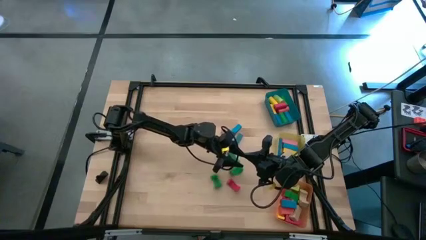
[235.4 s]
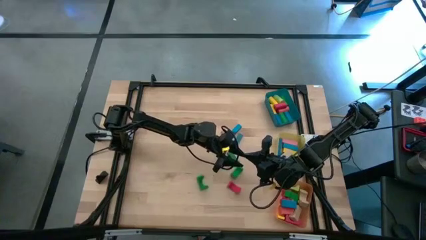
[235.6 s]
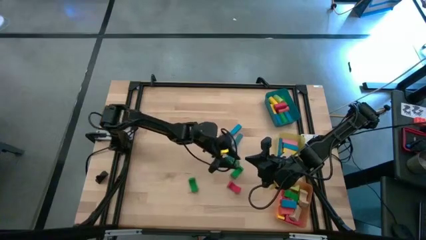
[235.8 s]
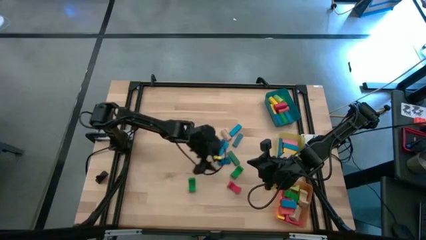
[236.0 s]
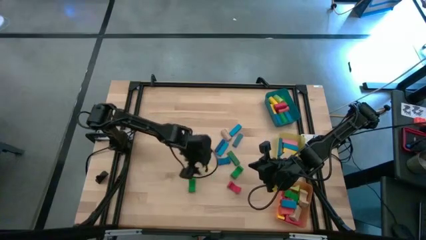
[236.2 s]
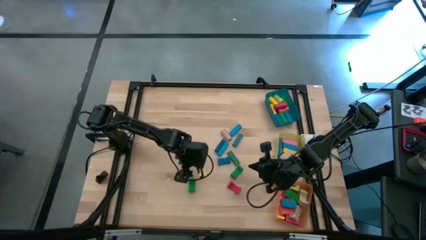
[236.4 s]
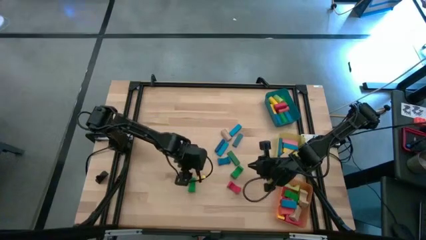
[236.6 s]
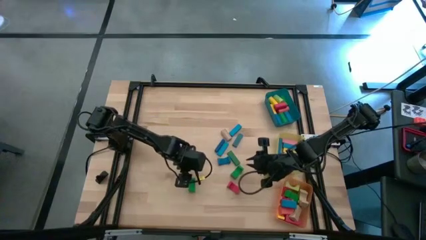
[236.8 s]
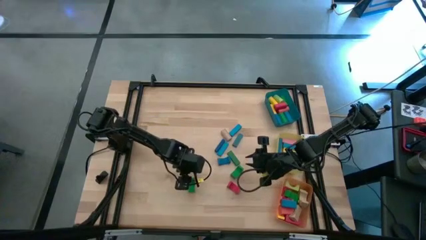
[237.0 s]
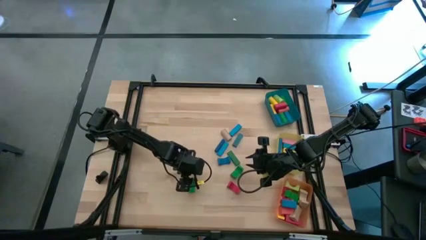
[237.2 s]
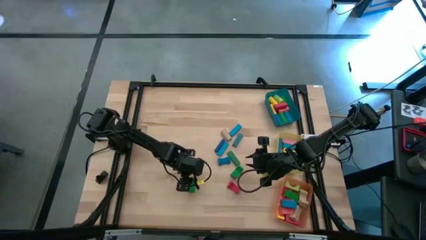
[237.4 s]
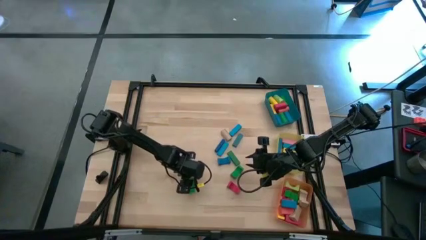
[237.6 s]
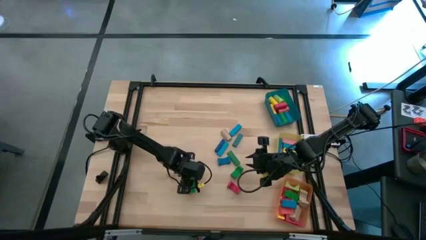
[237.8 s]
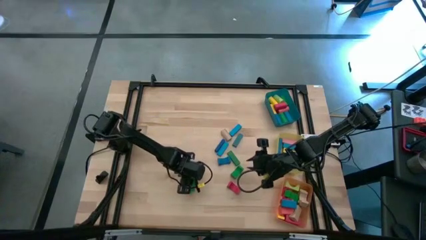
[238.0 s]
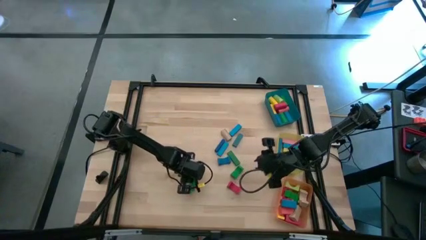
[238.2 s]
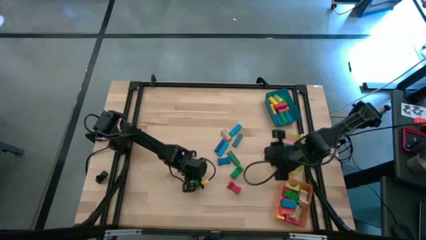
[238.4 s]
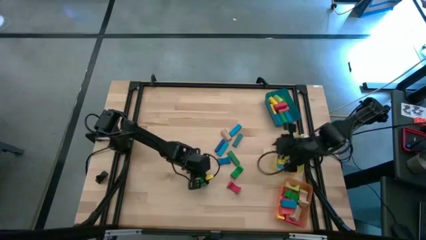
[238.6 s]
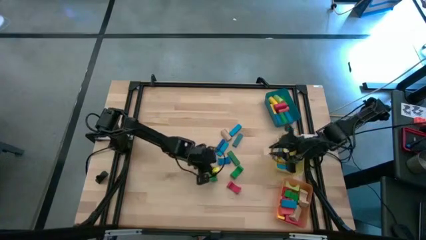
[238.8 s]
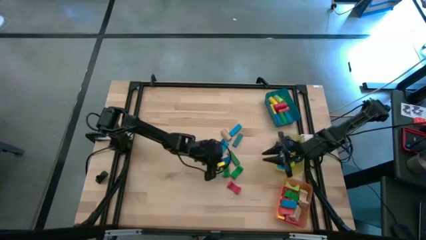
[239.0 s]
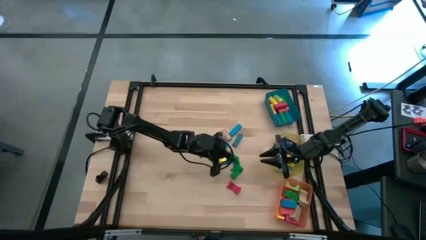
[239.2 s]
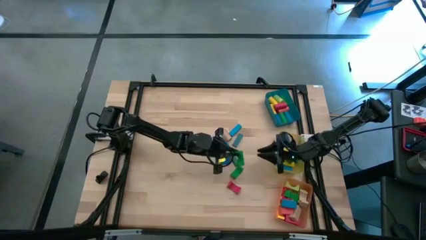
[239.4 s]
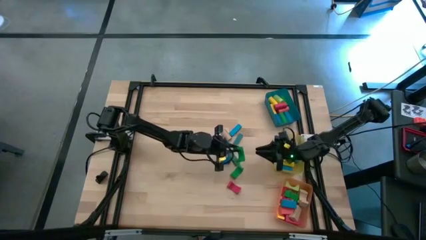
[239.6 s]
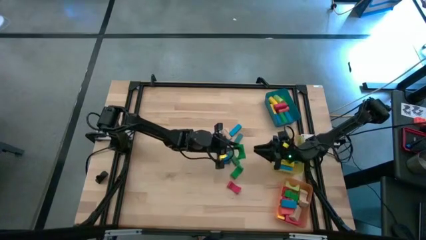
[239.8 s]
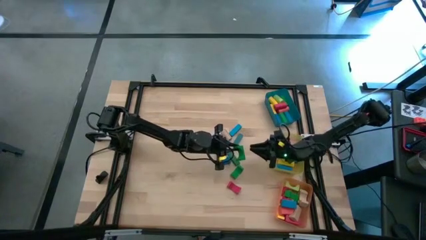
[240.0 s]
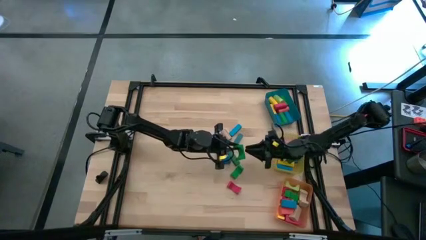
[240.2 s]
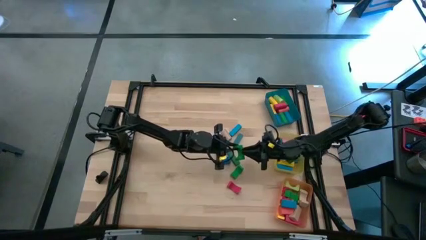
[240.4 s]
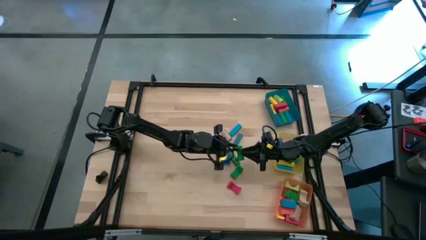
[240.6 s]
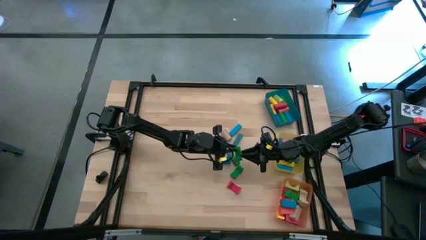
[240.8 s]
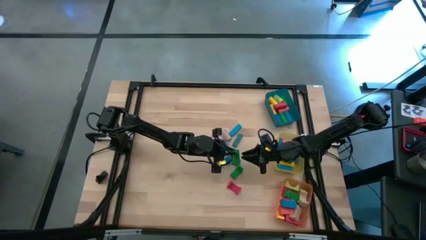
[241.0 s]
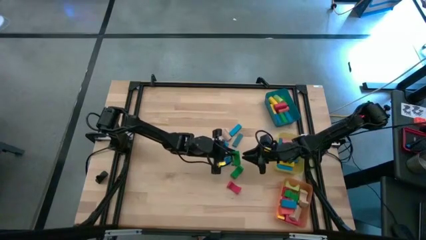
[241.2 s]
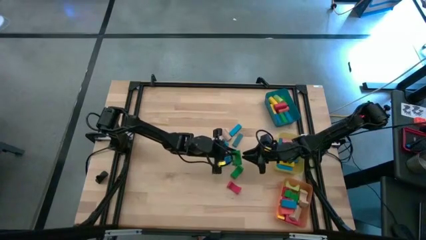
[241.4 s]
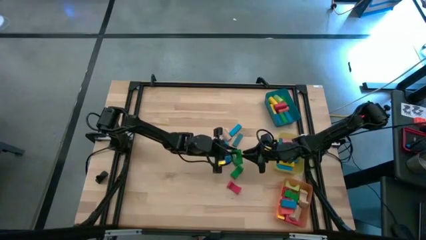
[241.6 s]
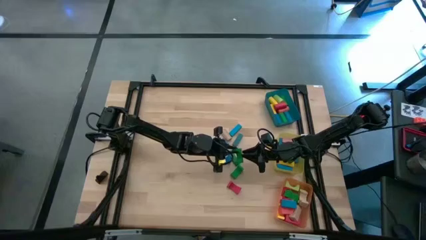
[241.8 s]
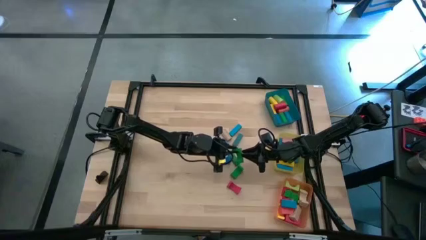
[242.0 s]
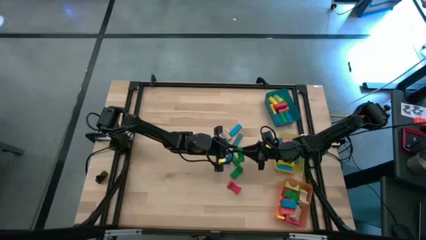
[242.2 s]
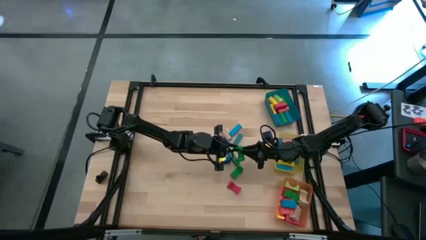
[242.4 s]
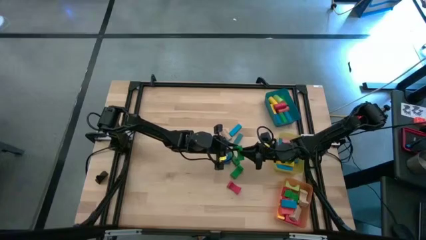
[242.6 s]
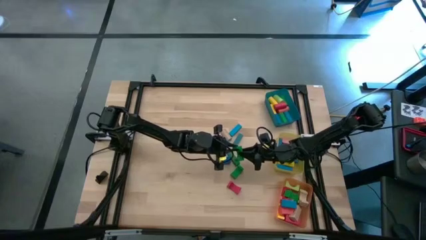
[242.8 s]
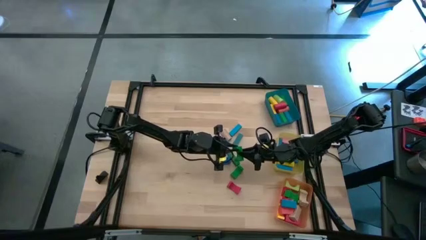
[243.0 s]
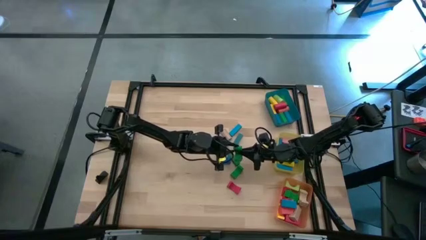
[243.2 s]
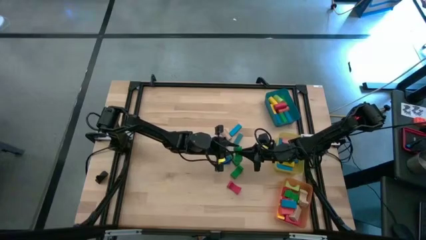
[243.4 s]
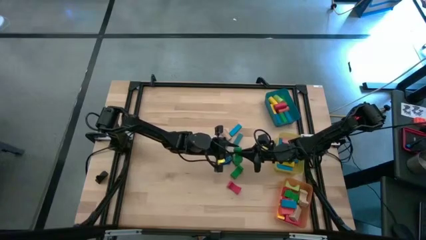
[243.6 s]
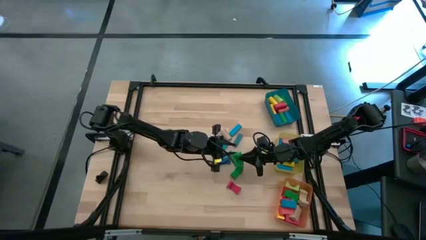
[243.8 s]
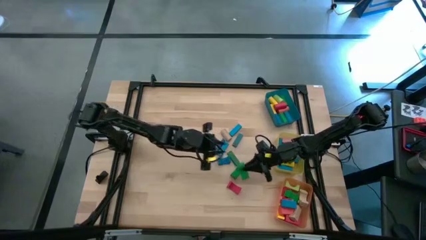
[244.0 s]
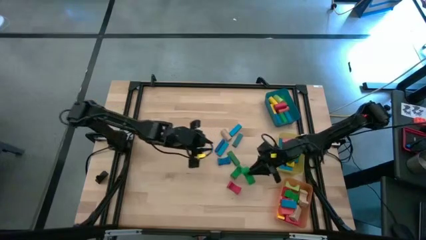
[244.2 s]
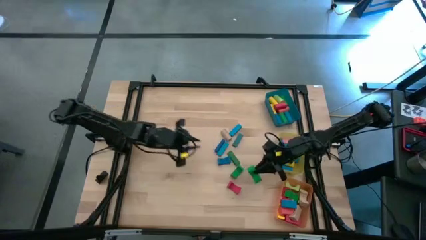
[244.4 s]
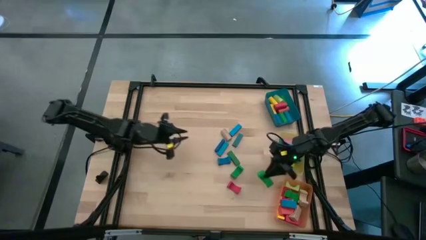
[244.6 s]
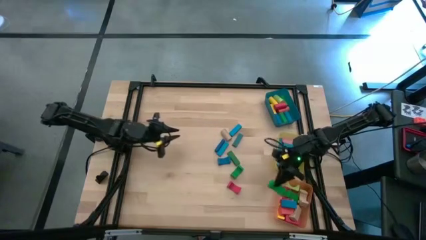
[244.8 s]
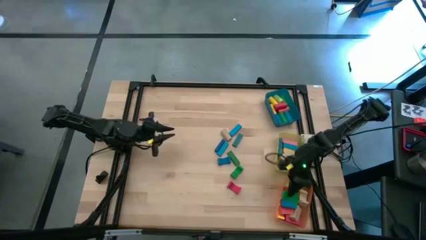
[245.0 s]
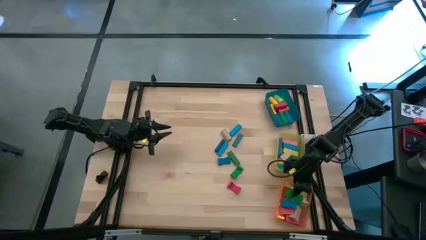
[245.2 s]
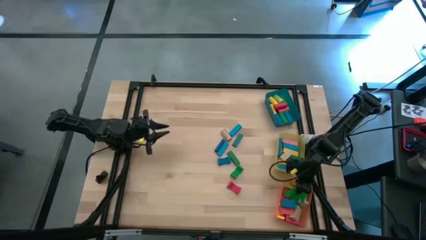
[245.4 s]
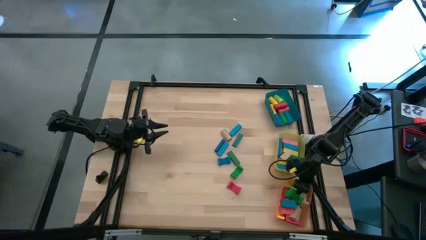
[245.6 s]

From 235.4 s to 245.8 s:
Task: Sort blocks by size
Put the green arch block into the orange bin

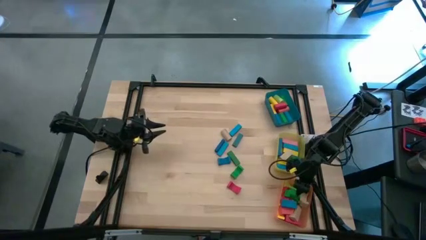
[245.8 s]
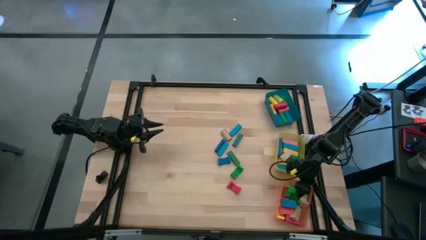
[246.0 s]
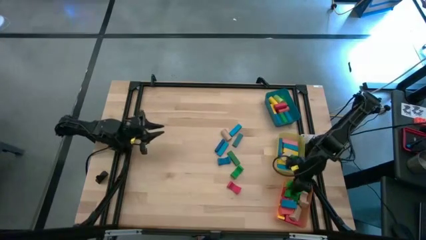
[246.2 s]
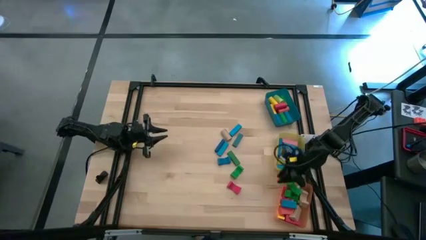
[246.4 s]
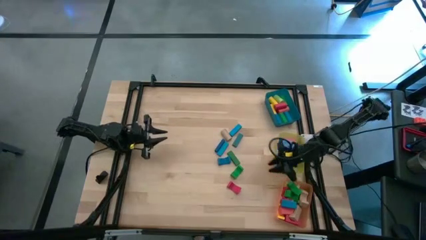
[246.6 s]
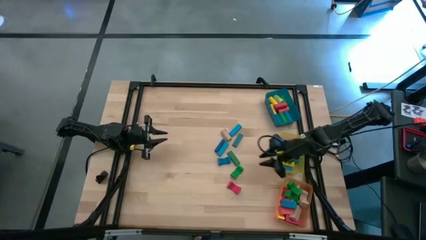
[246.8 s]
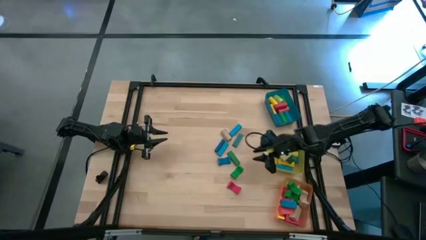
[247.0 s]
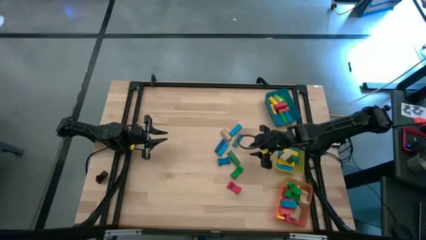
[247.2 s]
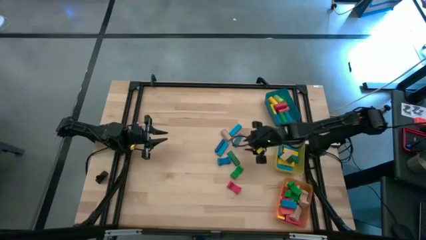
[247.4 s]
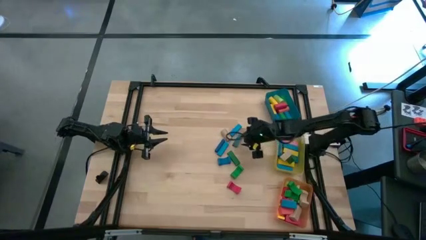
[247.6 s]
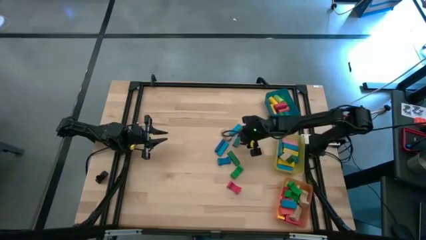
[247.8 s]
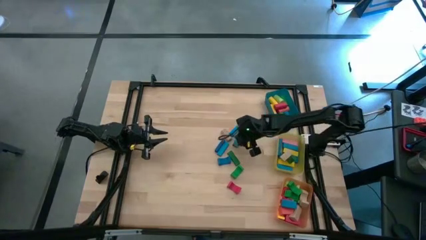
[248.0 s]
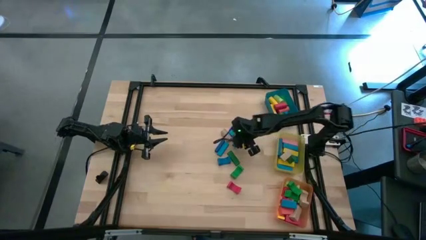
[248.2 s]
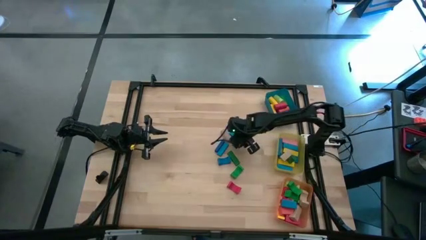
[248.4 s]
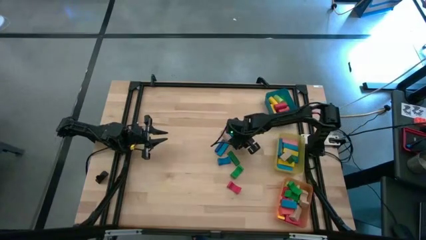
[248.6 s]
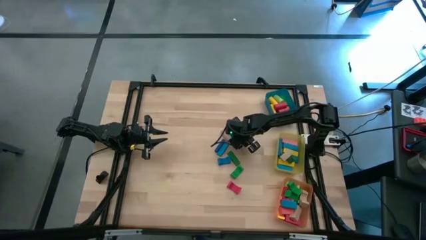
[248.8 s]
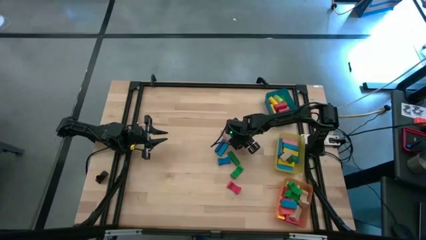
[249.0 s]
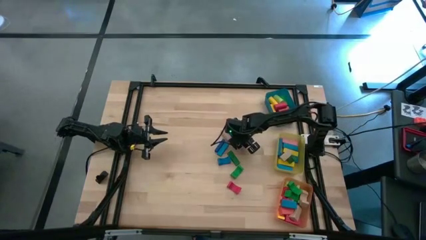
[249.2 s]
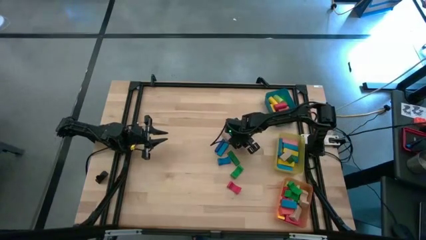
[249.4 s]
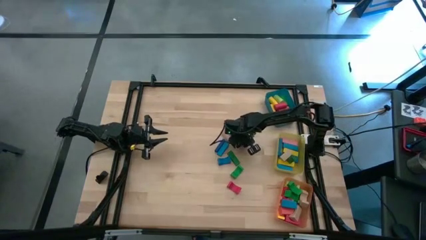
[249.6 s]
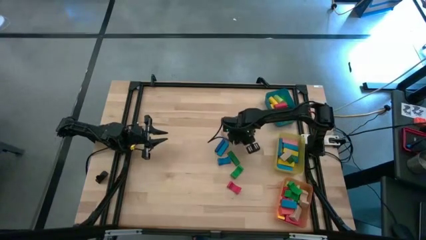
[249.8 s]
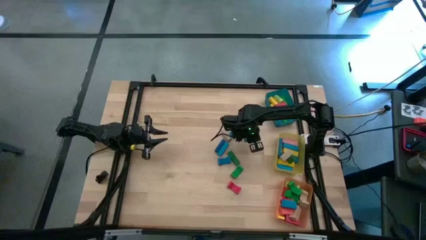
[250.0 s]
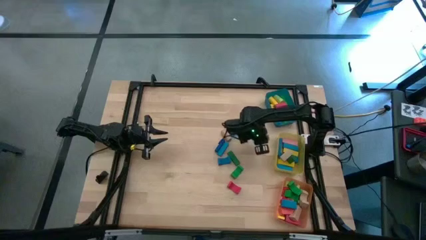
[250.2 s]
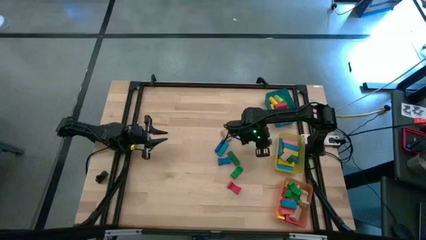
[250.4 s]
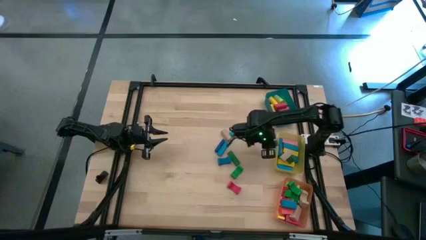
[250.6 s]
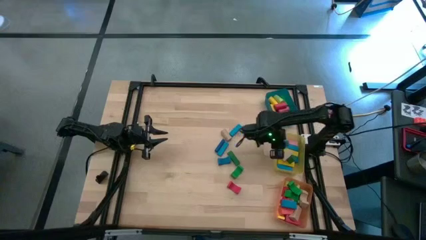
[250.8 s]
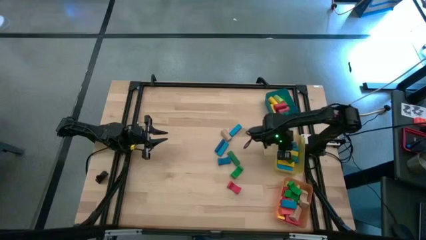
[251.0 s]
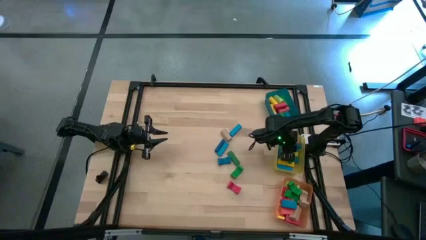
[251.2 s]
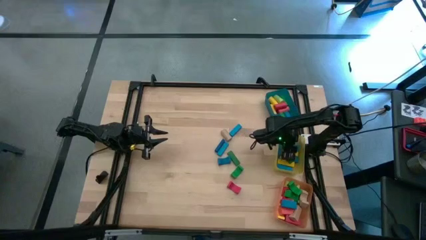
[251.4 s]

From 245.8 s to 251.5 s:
Put the blue rectangular block into the yellow bin
